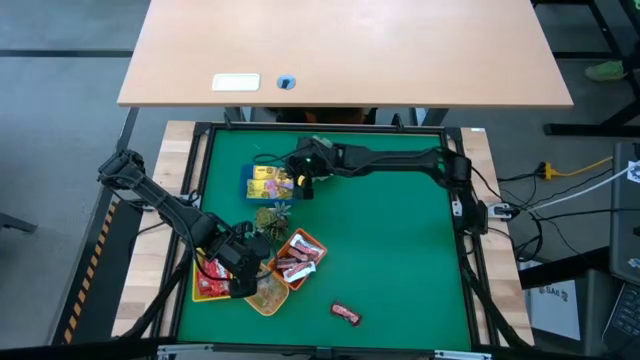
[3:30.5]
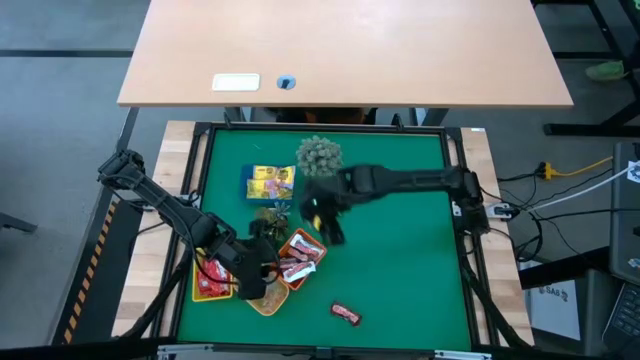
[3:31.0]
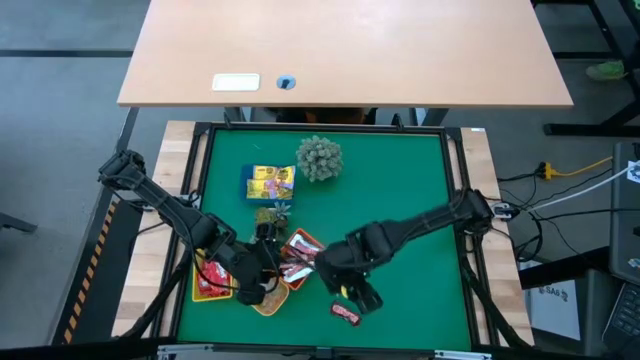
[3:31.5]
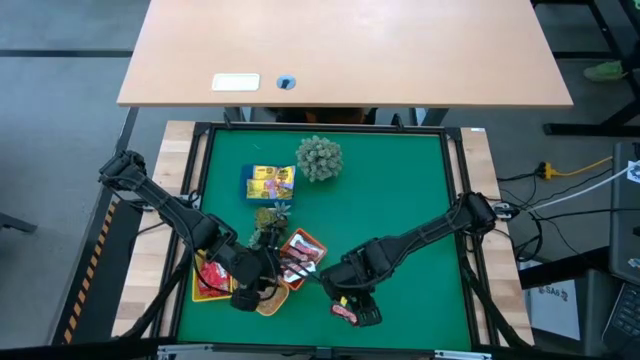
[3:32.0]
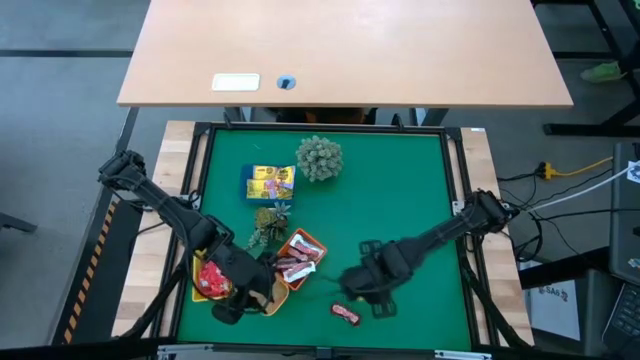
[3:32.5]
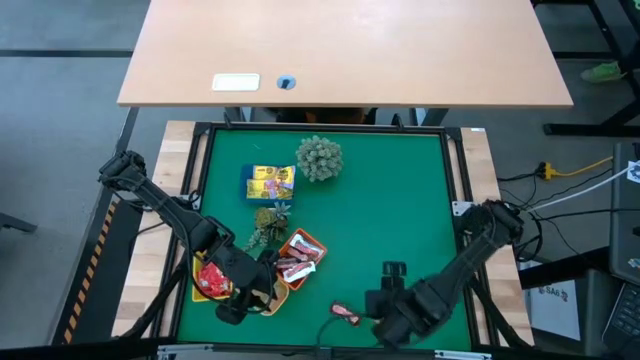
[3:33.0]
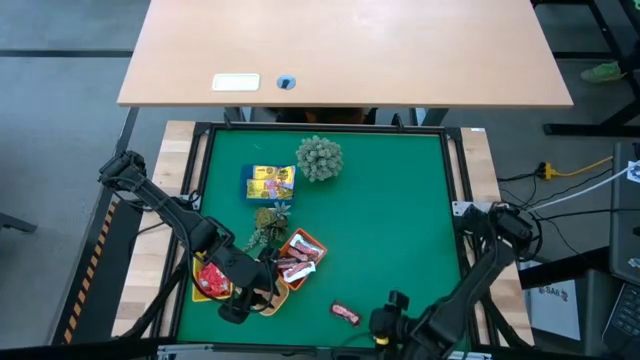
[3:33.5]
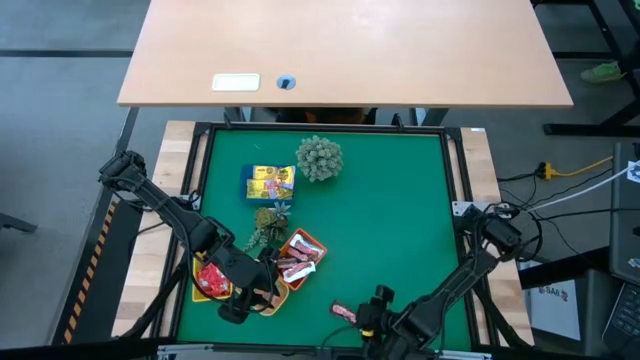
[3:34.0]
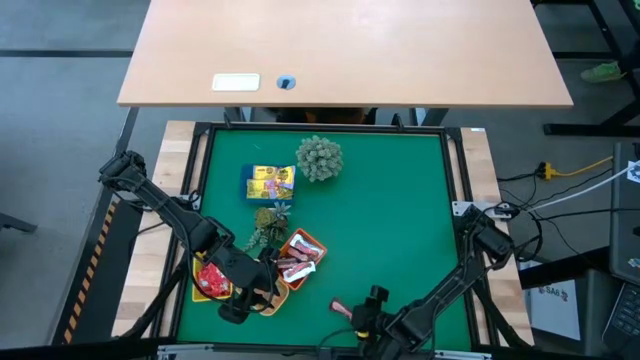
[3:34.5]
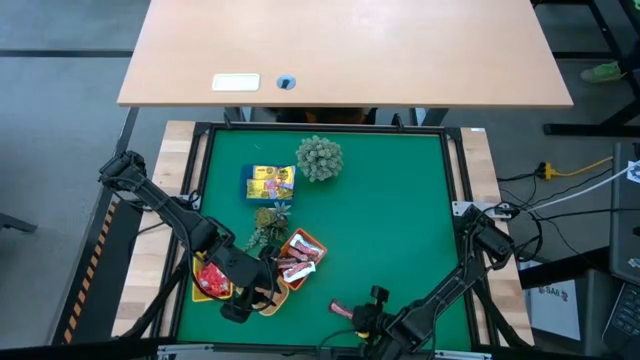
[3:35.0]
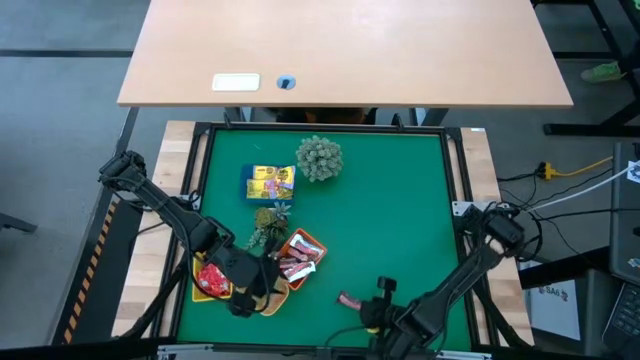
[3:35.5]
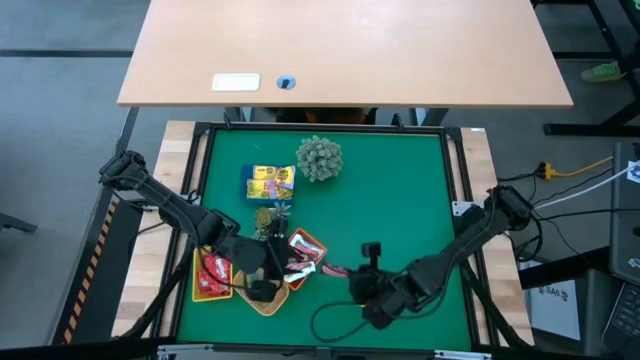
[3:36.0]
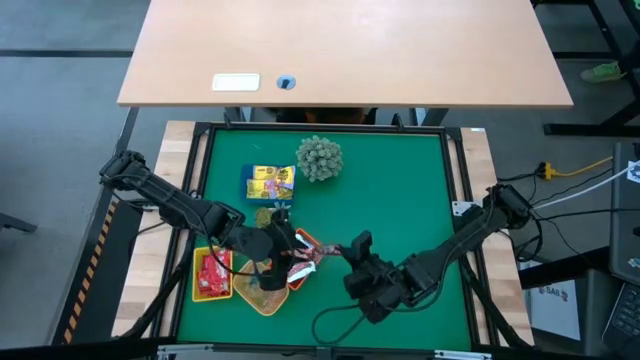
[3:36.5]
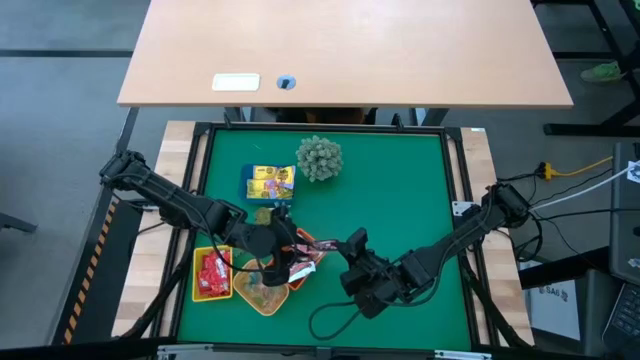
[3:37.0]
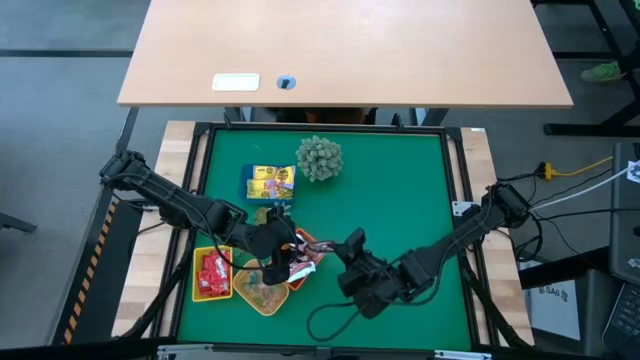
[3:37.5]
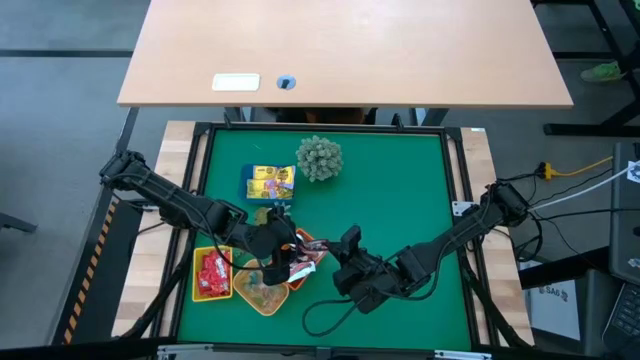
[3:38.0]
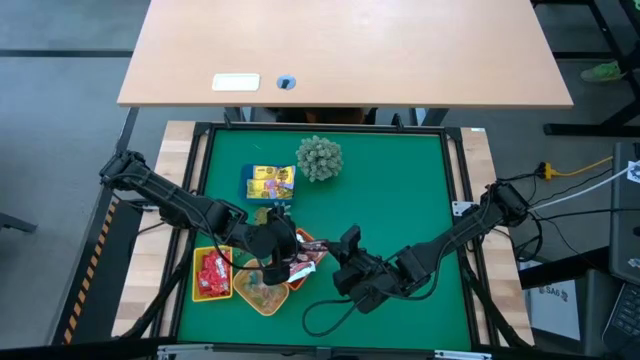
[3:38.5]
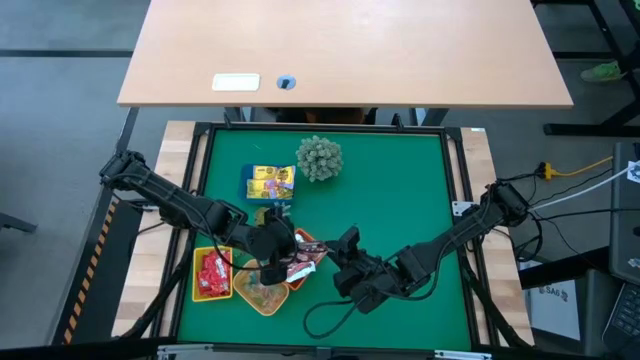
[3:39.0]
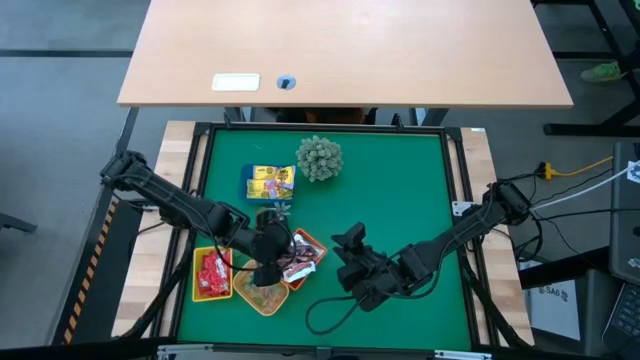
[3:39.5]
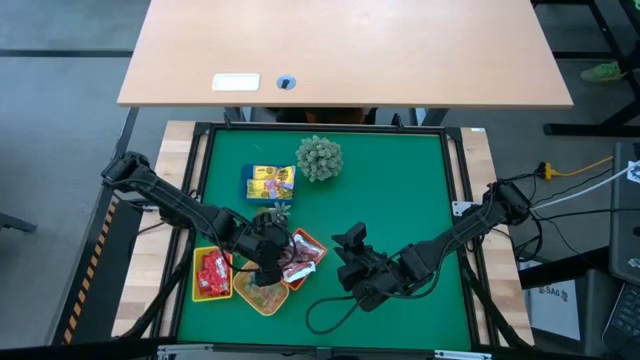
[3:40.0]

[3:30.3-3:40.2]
Task: Sort candy
Put the brown chocolate into the orange bin

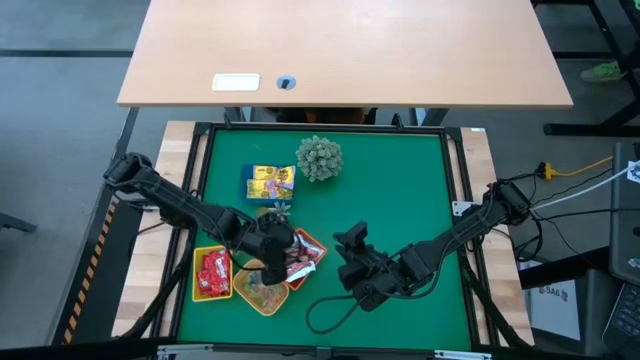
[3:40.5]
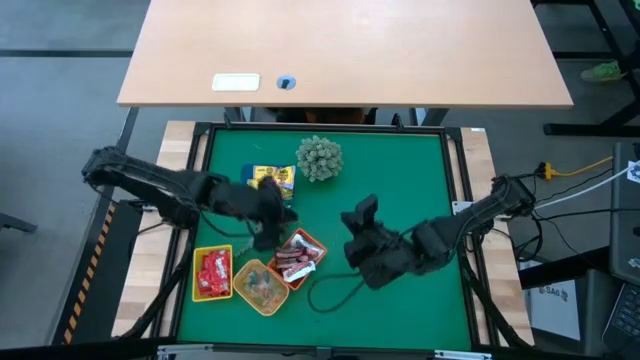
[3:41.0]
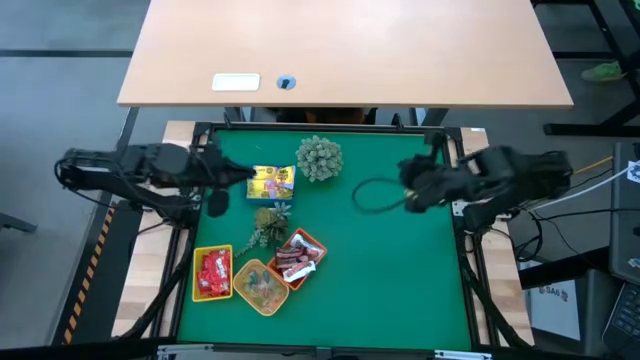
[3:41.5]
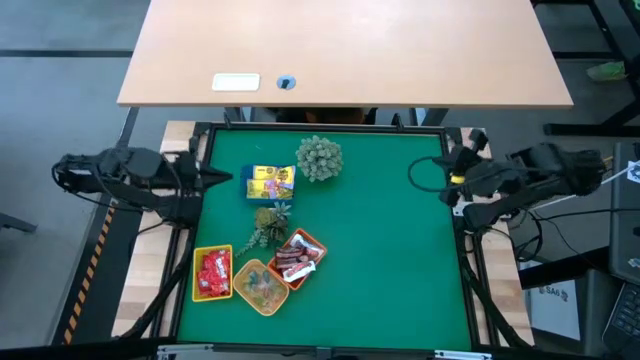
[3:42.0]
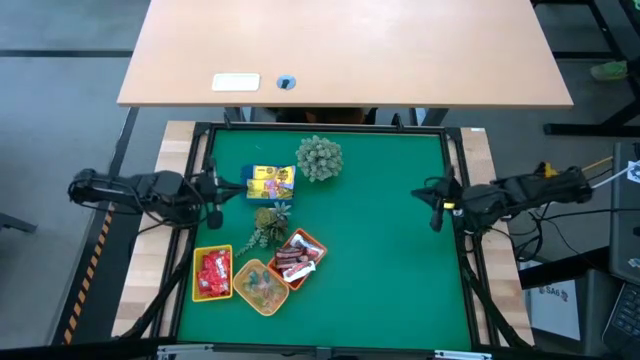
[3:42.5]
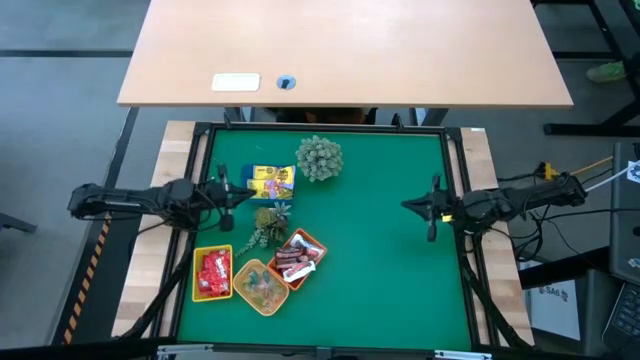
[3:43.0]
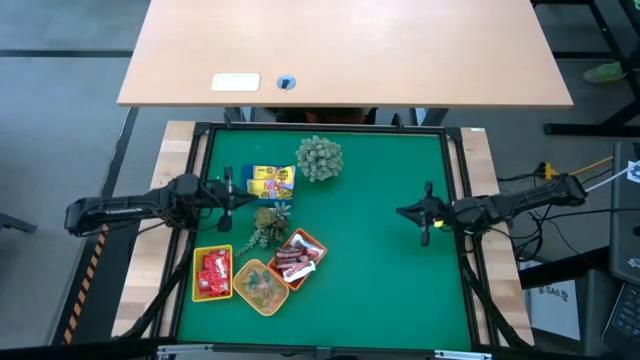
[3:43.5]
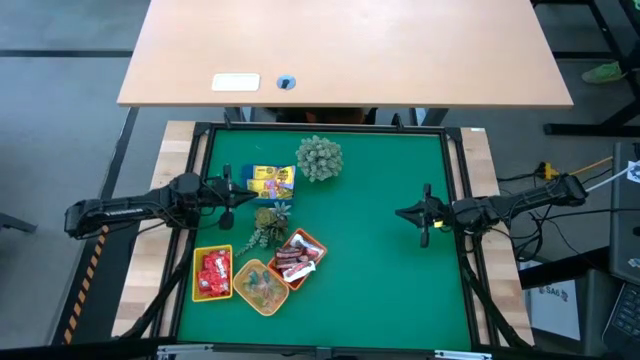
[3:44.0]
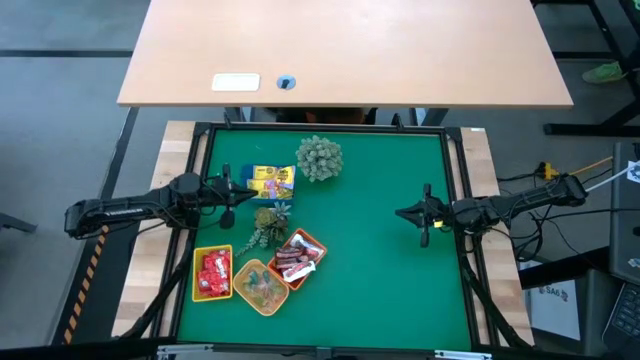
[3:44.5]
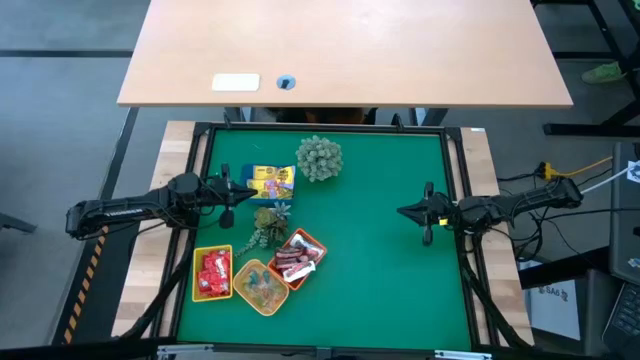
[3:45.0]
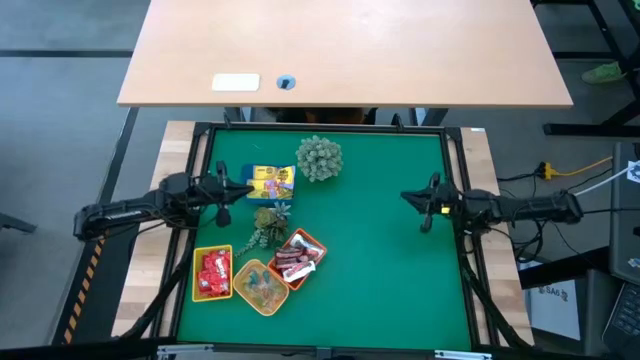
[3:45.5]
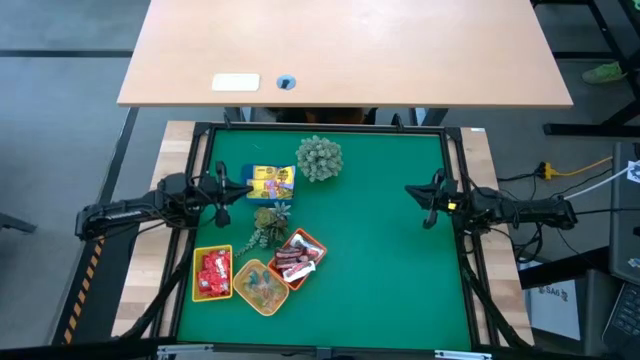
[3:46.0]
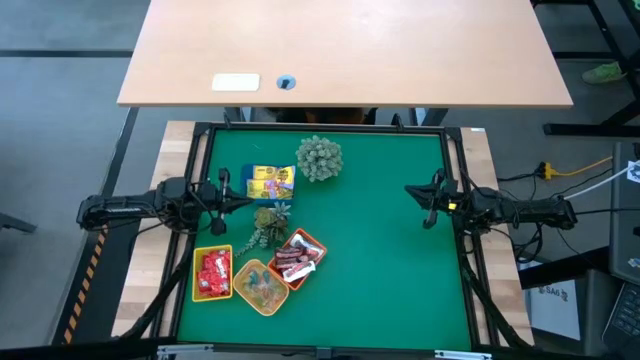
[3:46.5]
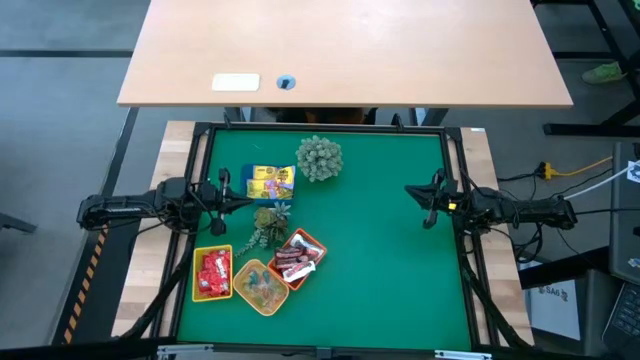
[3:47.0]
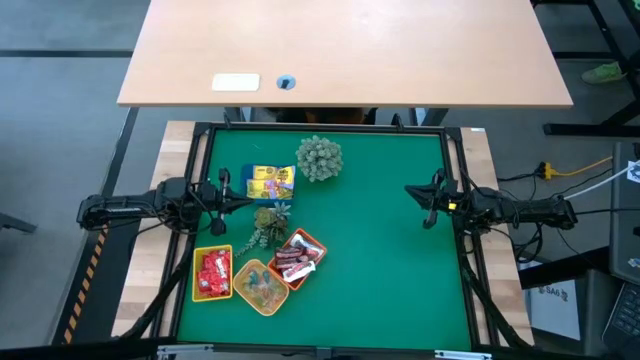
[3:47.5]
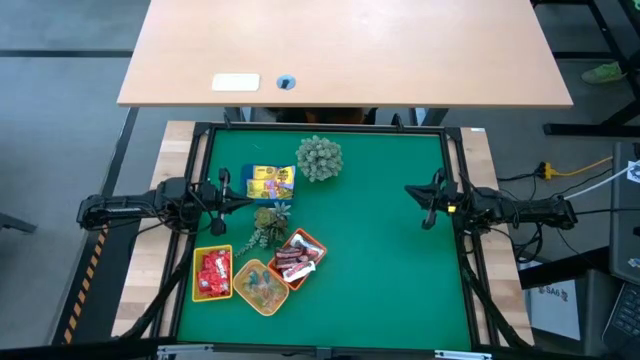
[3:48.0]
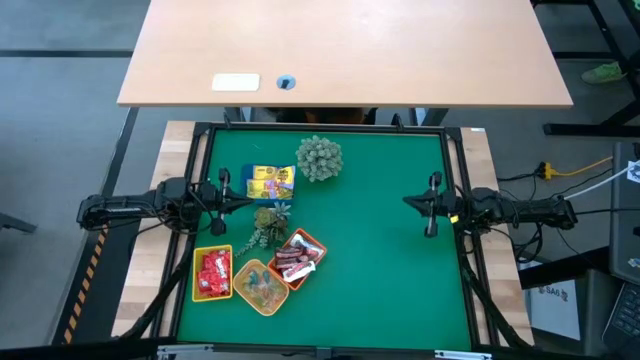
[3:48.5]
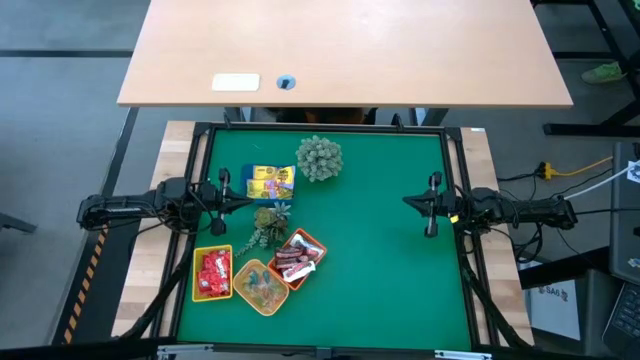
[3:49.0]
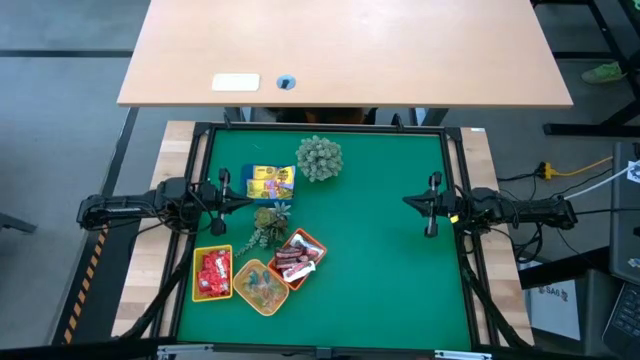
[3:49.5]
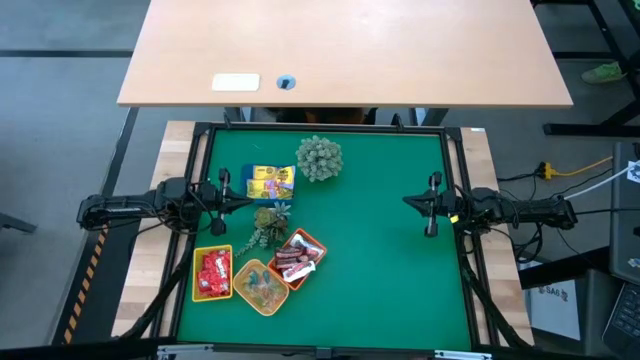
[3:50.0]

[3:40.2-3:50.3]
Return to Home Position
